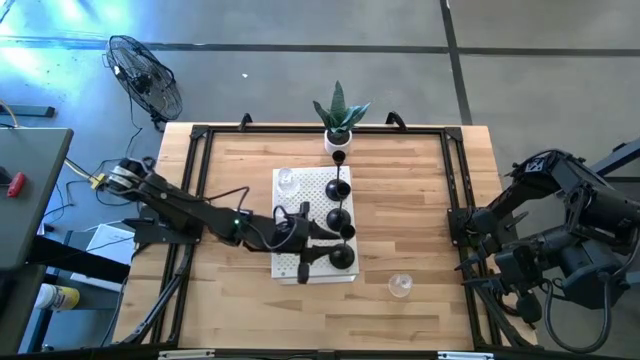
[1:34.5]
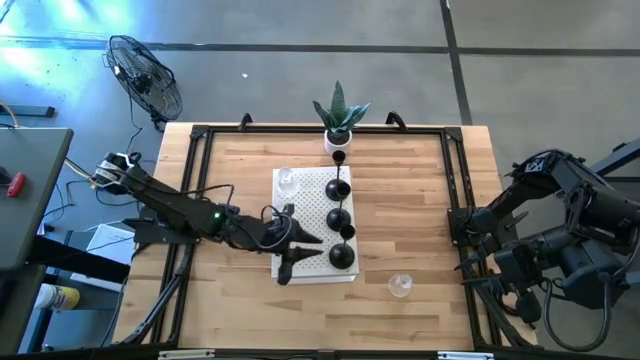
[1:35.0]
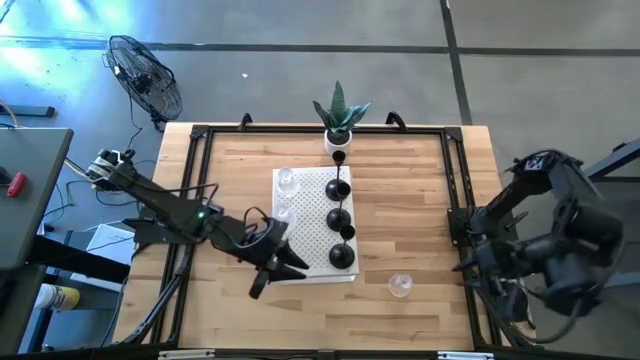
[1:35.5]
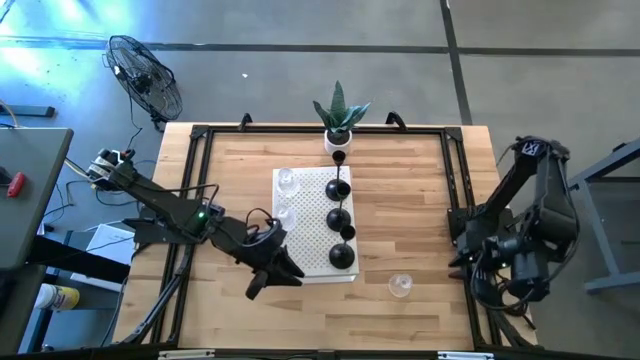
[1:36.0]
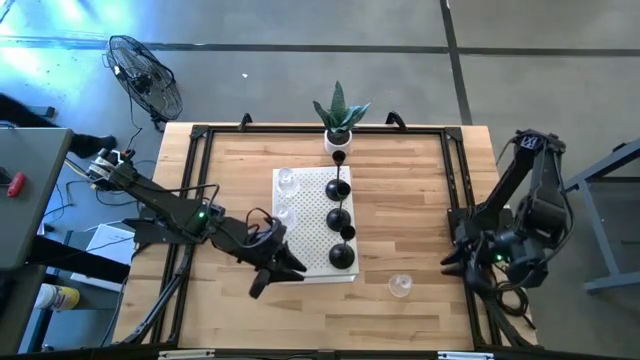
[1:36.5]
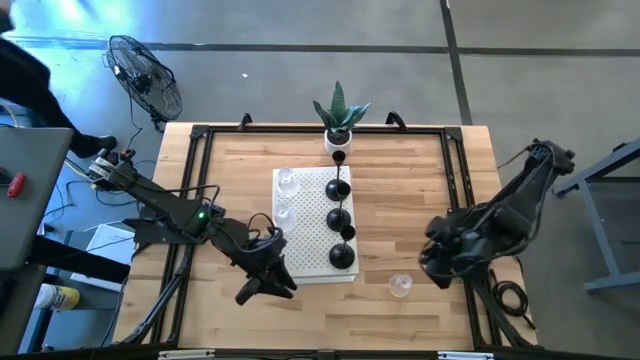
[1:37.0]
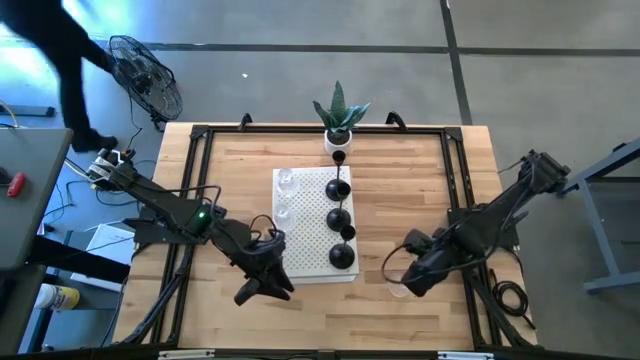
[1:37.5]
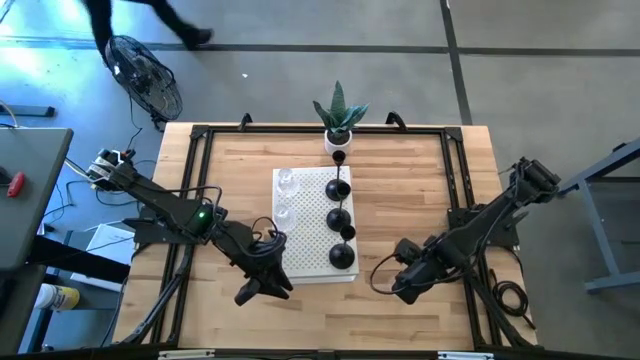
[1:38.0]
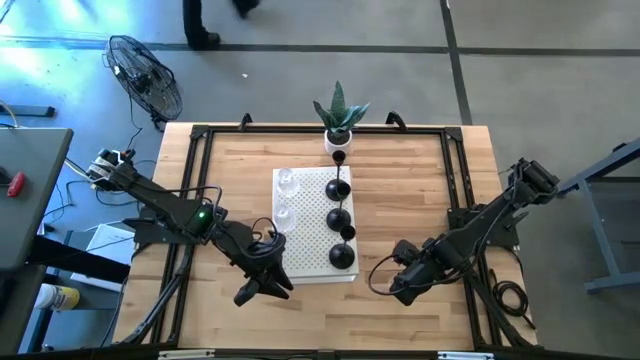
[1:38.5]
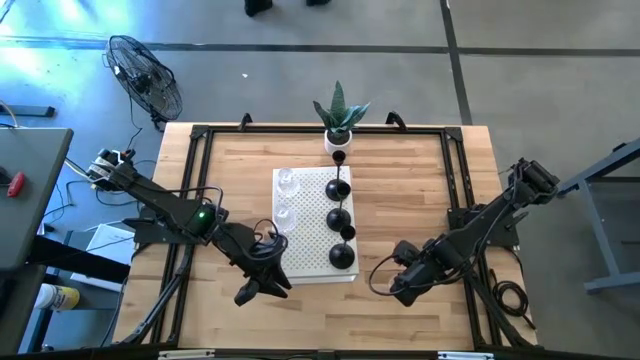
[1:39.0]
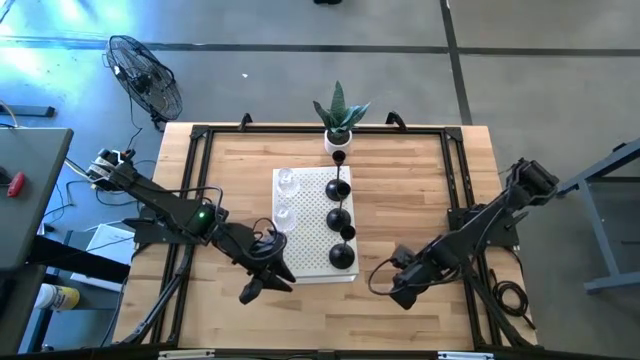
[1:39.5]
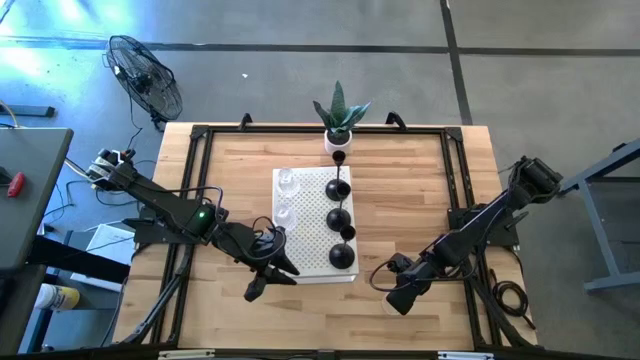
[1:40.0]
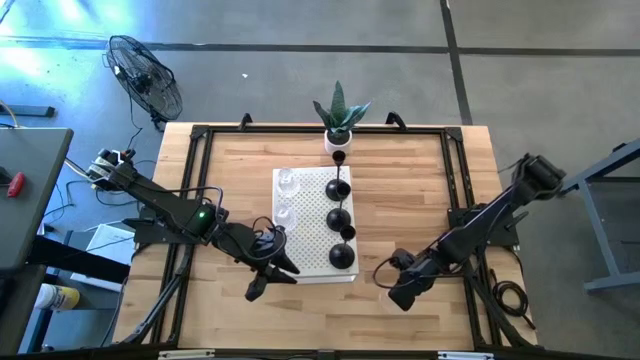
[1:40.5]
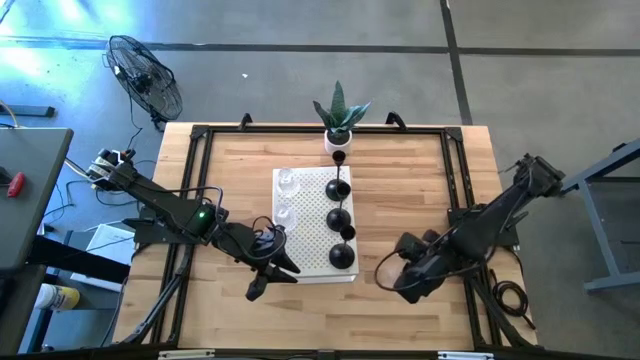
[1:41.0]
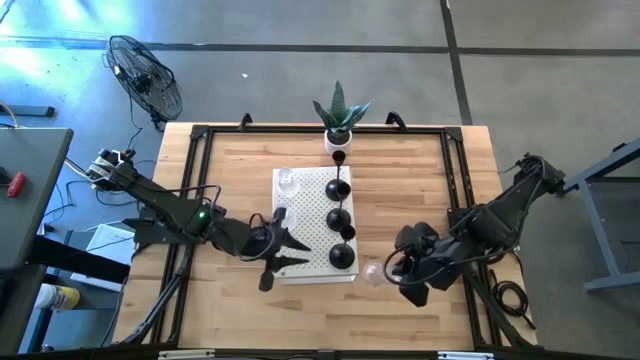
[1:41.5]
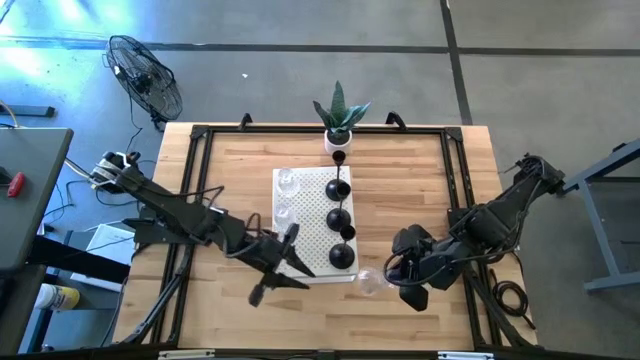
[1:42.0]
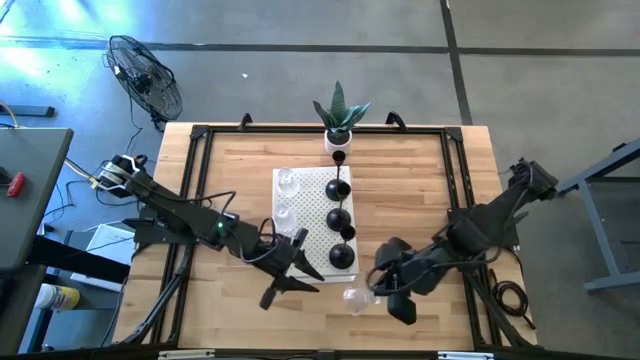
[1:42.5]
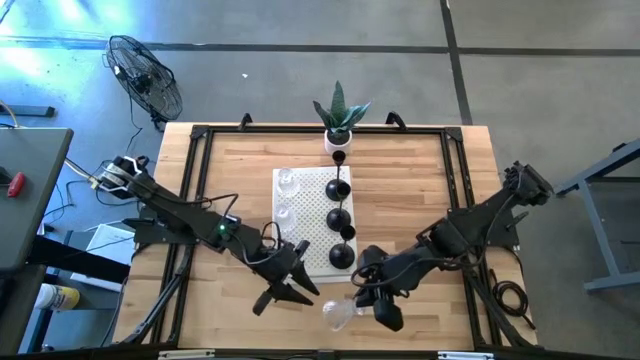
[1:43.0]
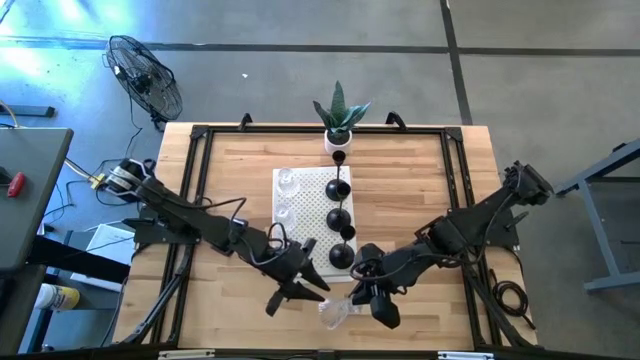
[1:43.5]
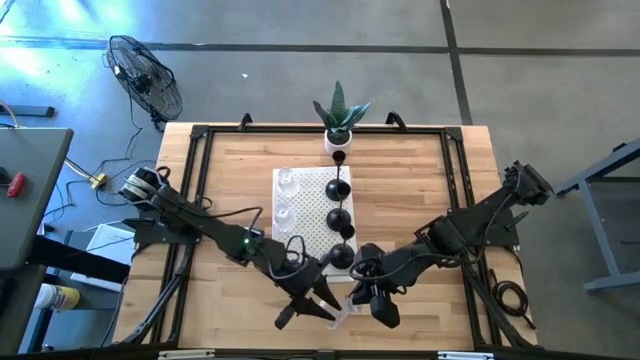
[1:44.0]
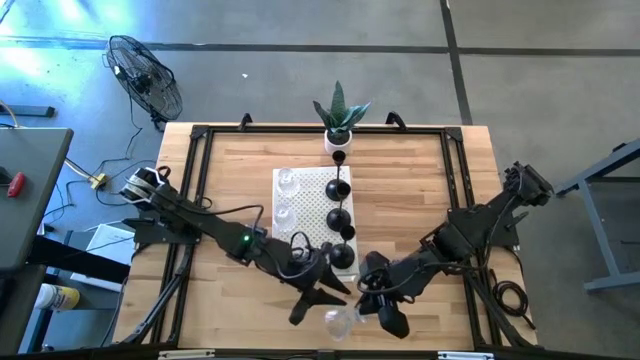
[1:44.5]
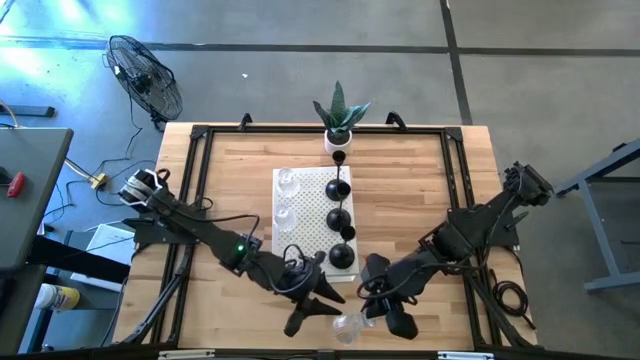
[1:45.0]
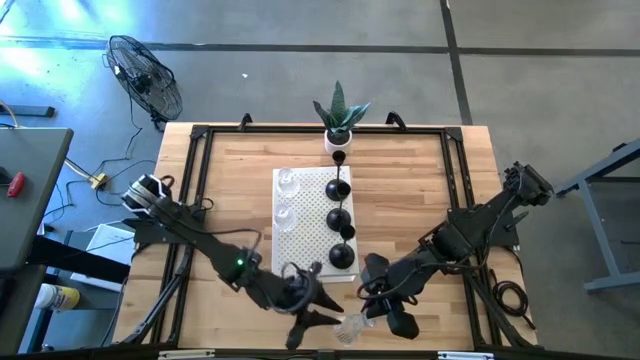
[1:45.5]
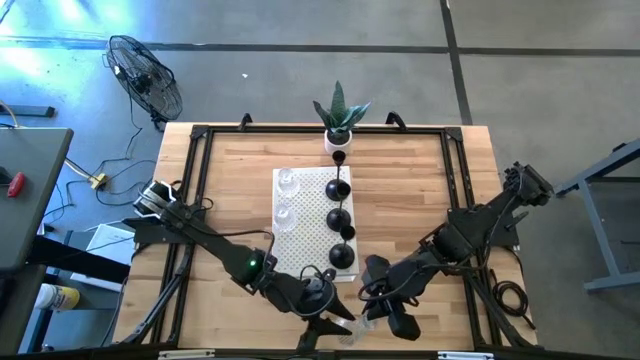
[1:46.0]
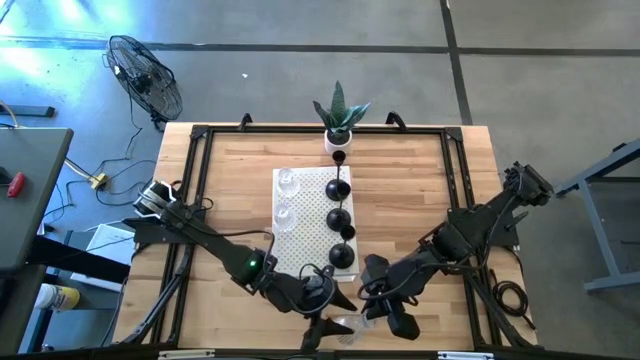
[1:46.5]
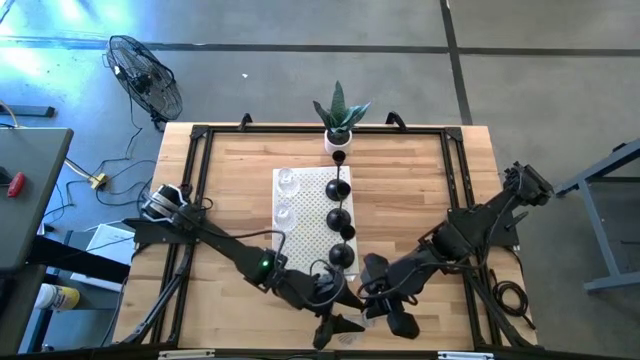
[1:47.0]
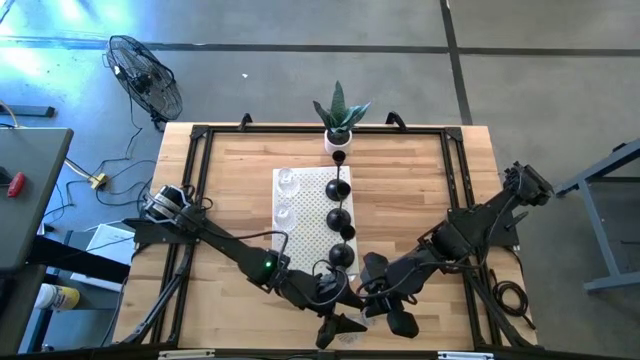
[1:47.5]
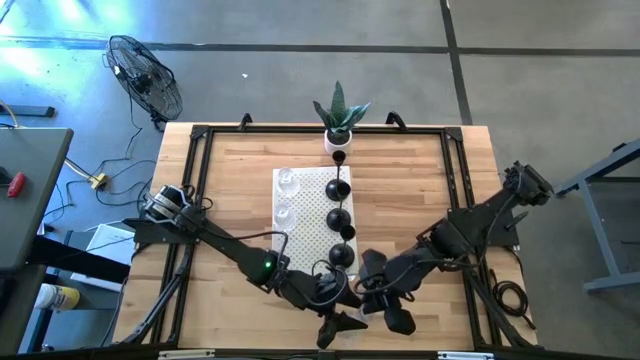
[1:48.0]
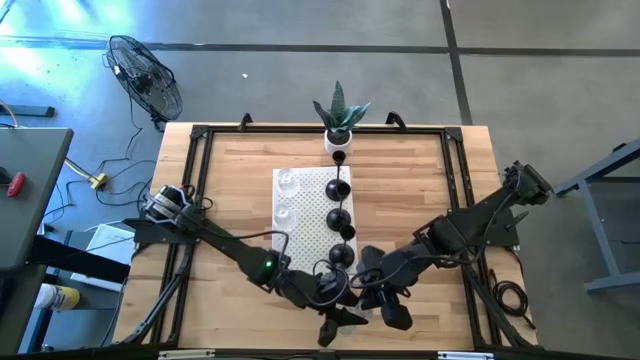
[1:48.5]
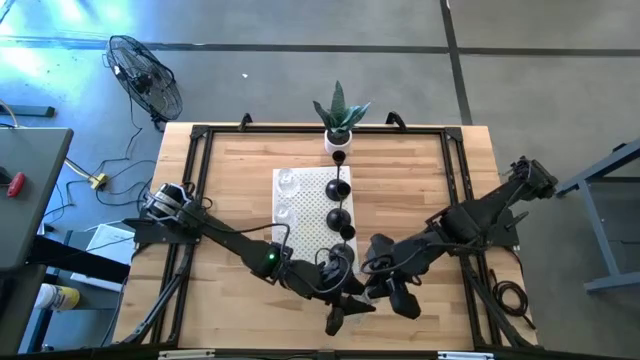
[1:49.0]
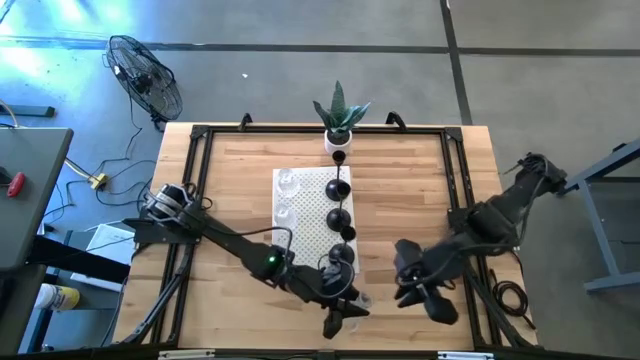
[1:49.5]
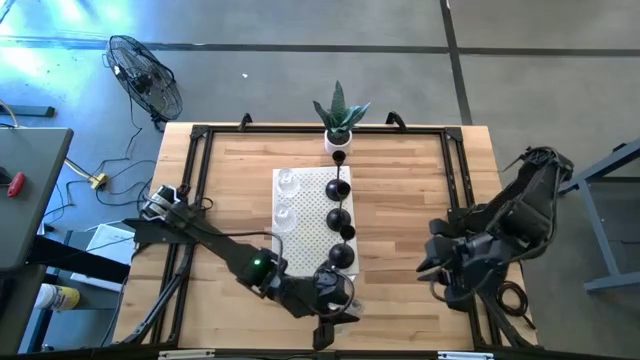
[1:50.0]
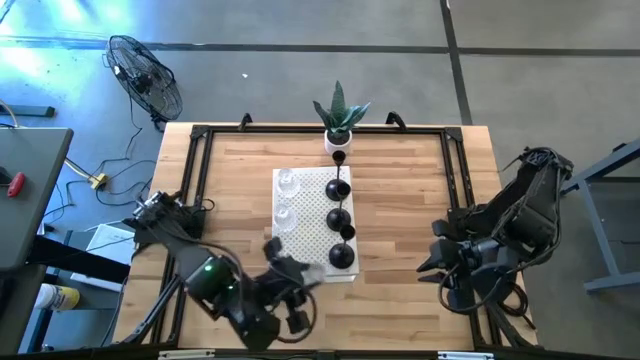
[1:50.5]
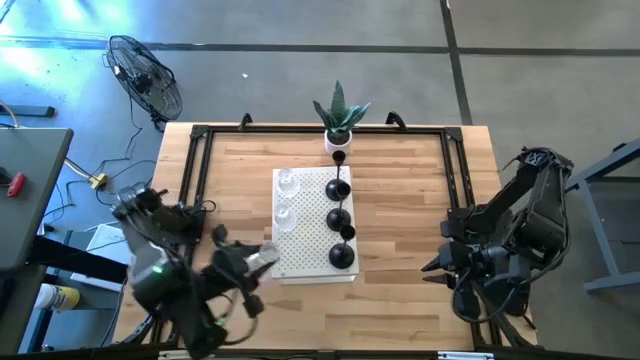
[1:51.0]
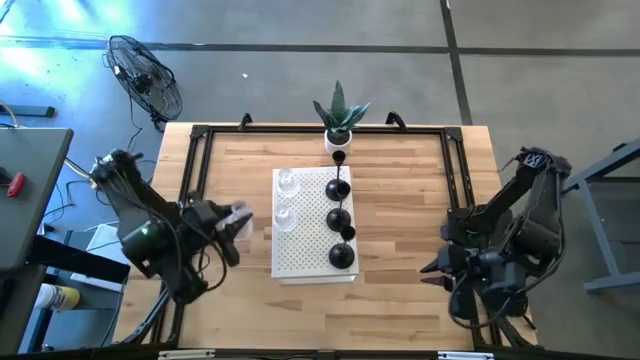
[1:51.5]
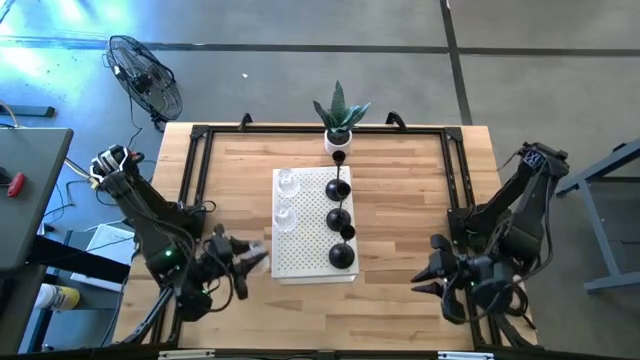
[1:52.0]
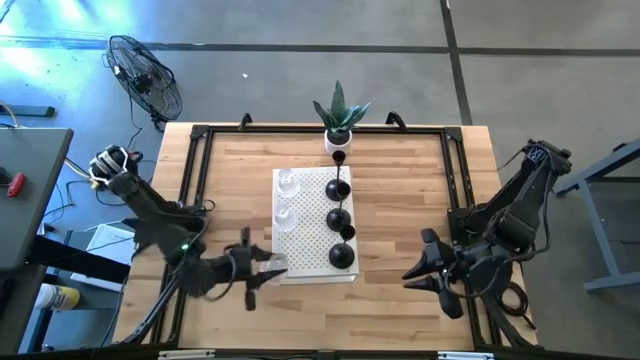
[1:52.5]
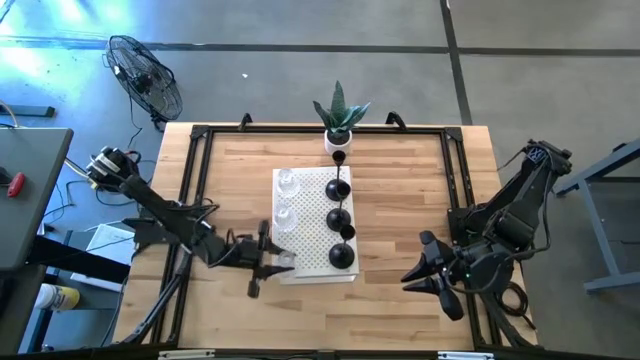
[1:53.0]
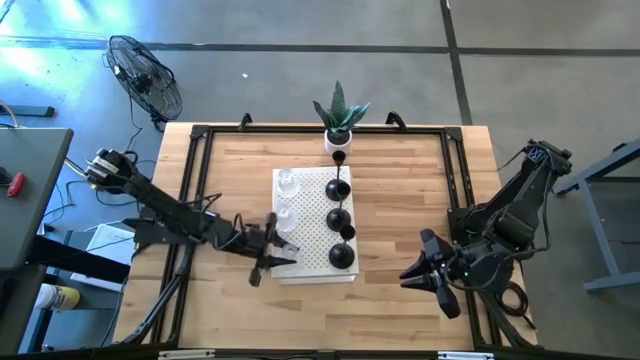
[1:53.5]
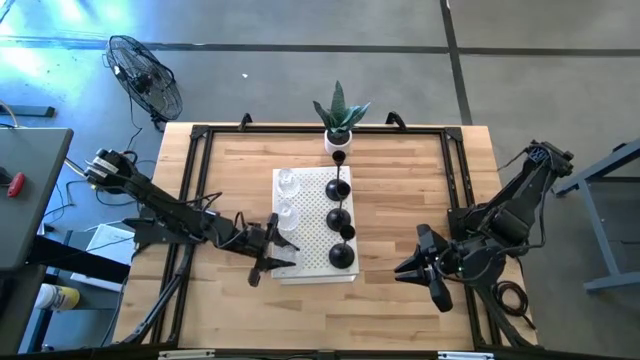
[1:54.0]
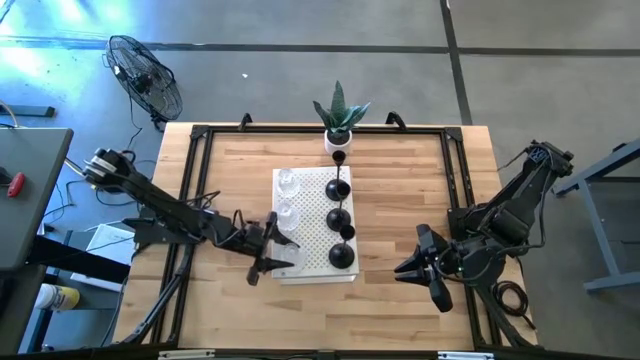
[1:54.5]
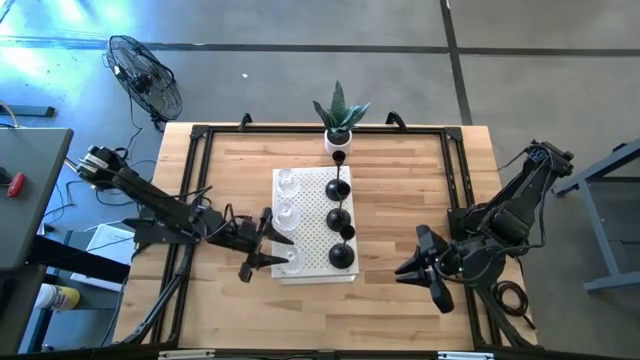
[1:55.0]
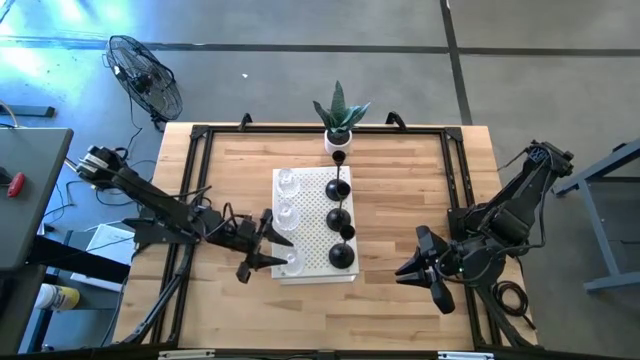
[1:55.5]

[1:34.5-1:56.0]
Task: Pick & Place candle stick holders
Put the transparent glass candle holder on the shelf aligned with the other transparent glass candle holders
